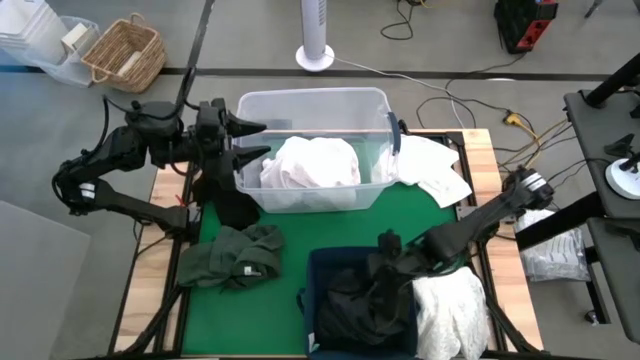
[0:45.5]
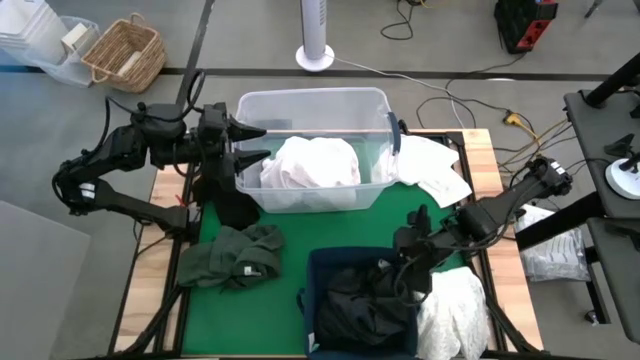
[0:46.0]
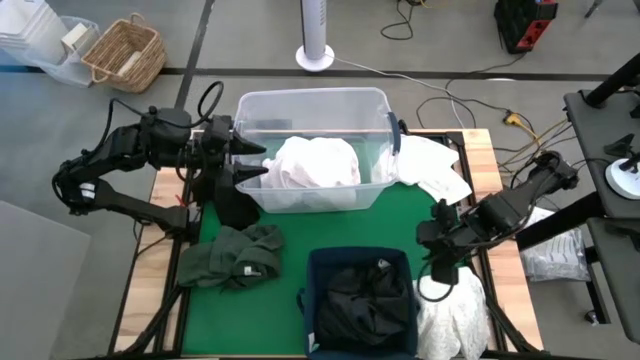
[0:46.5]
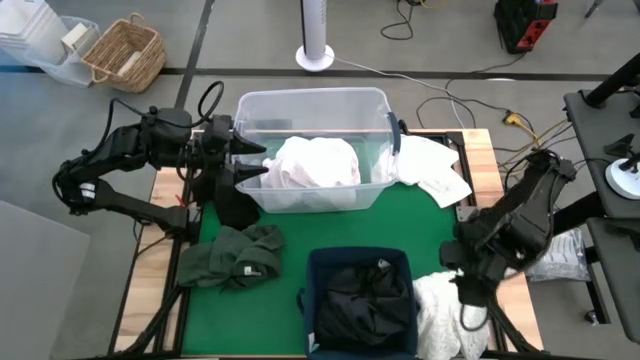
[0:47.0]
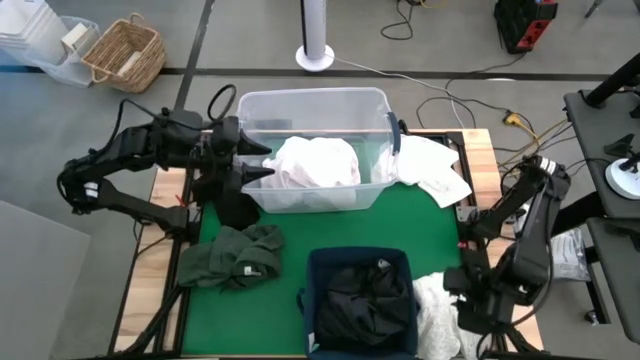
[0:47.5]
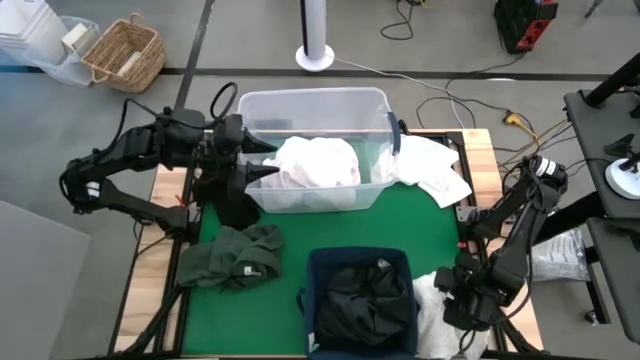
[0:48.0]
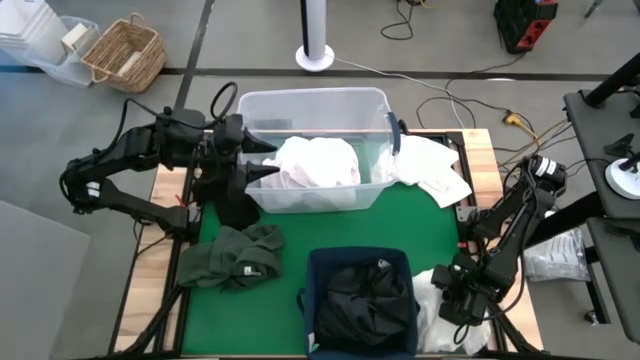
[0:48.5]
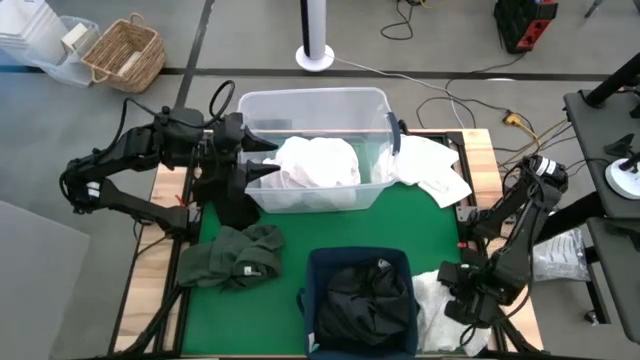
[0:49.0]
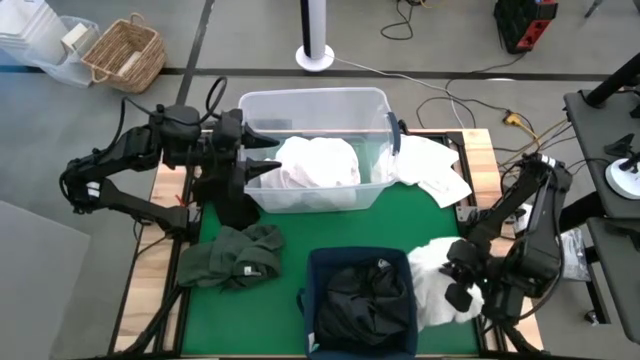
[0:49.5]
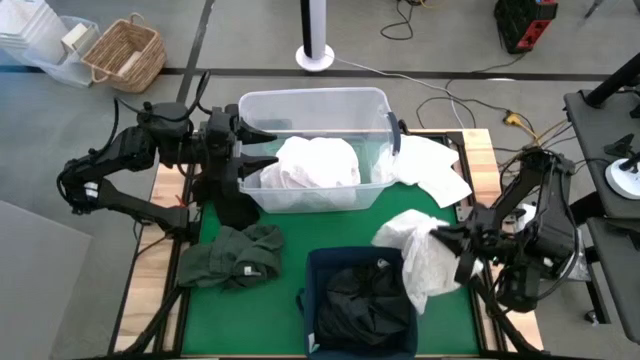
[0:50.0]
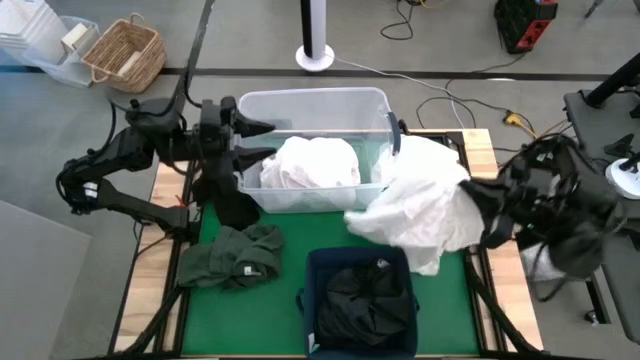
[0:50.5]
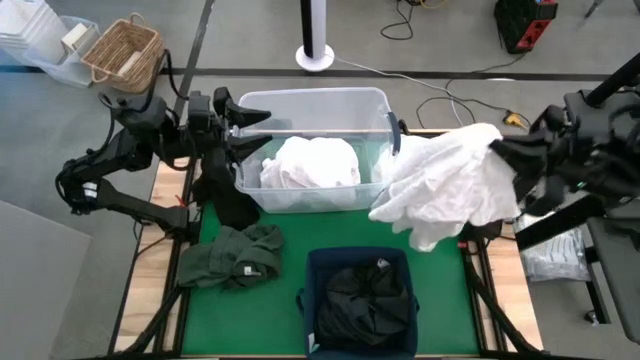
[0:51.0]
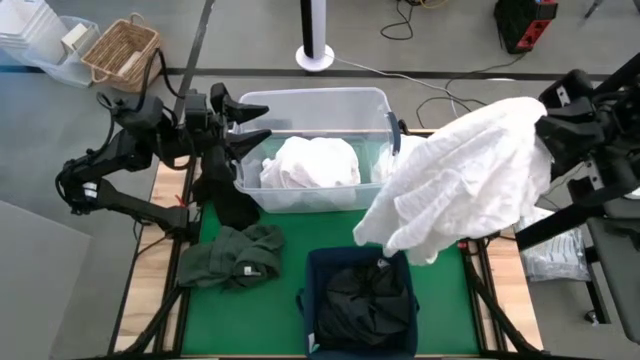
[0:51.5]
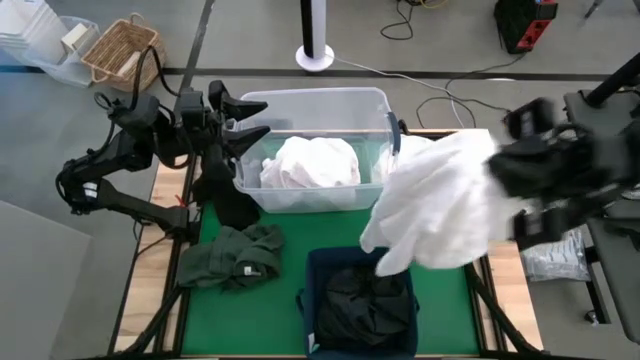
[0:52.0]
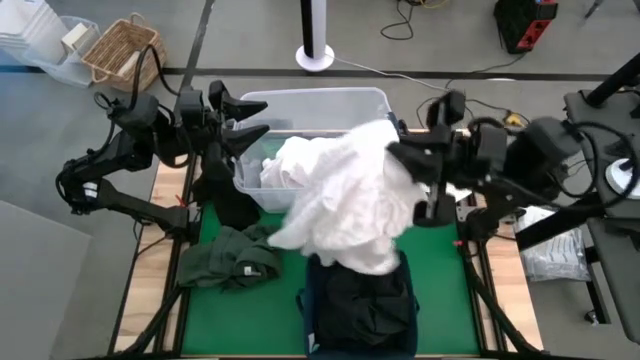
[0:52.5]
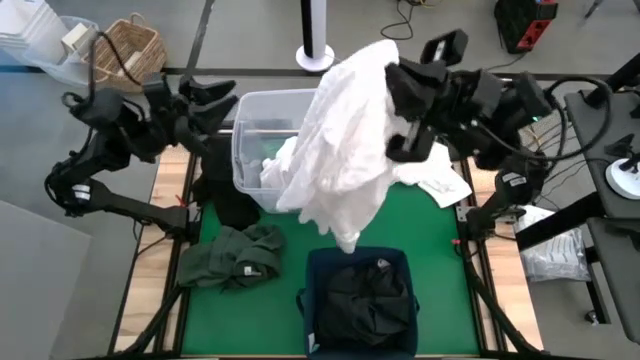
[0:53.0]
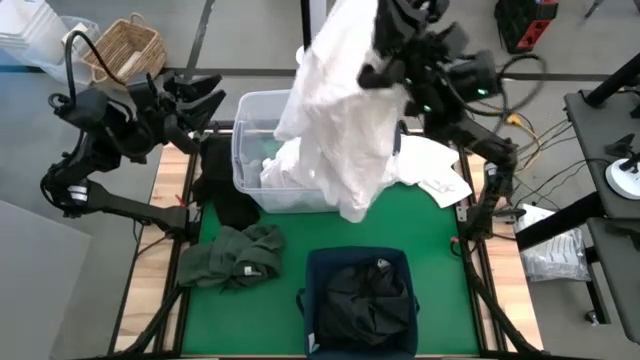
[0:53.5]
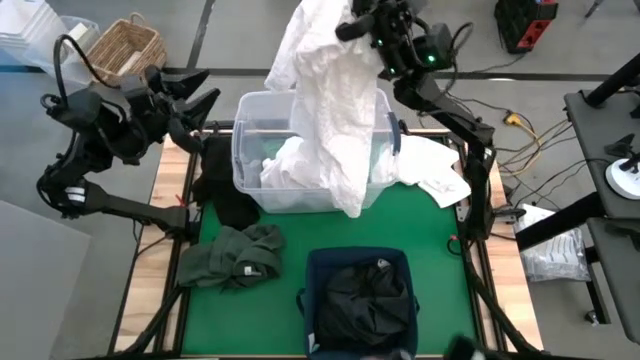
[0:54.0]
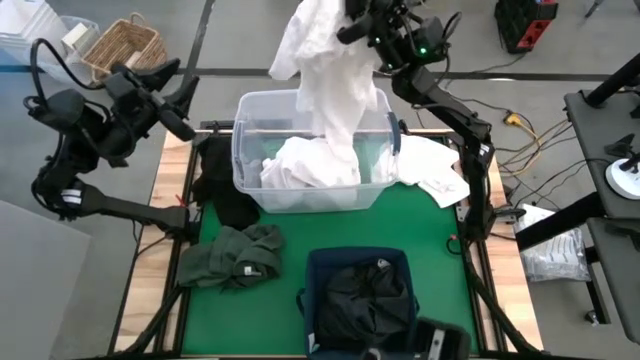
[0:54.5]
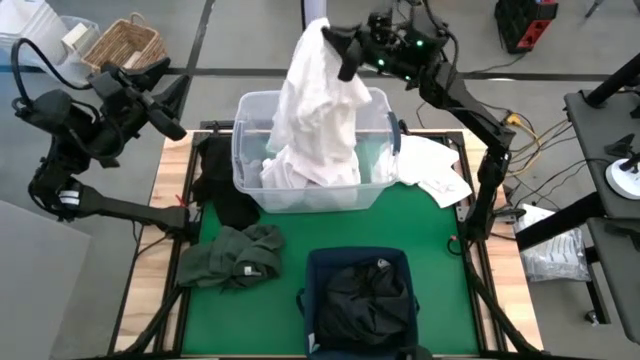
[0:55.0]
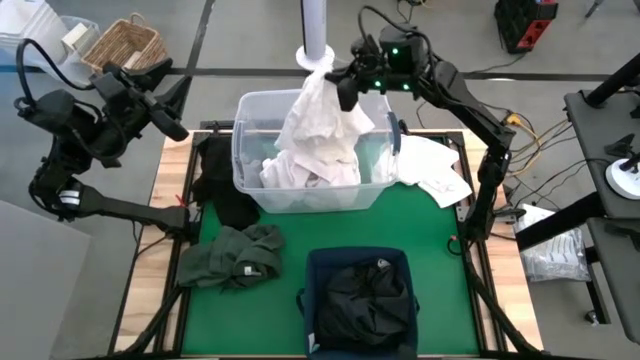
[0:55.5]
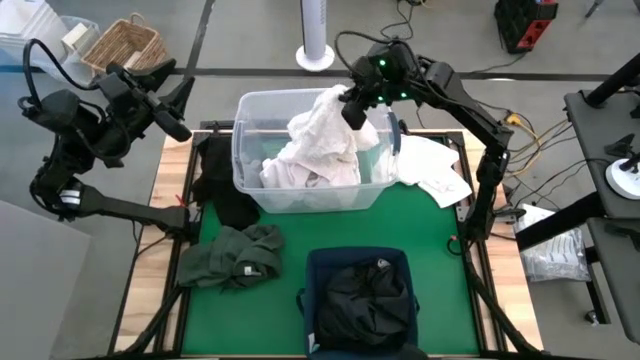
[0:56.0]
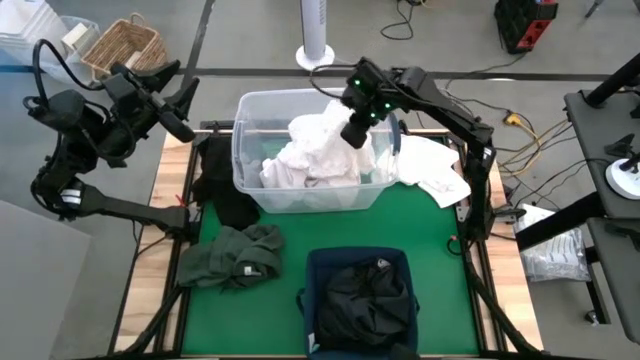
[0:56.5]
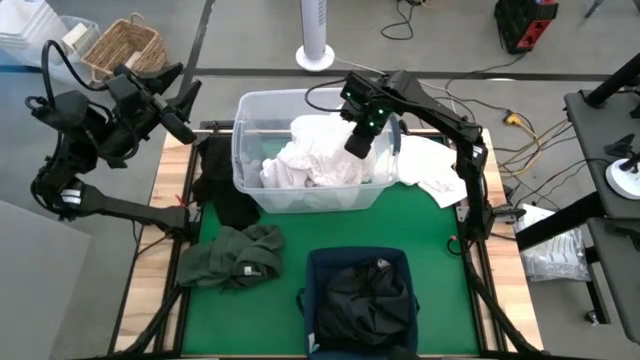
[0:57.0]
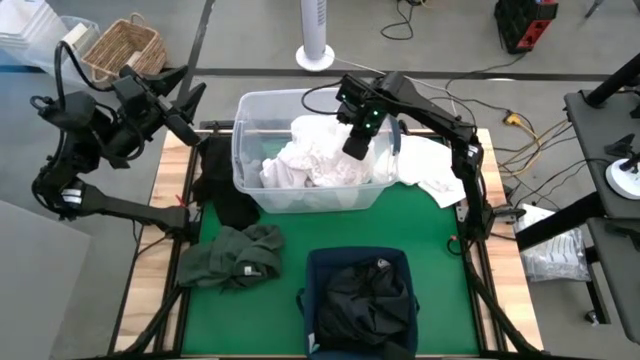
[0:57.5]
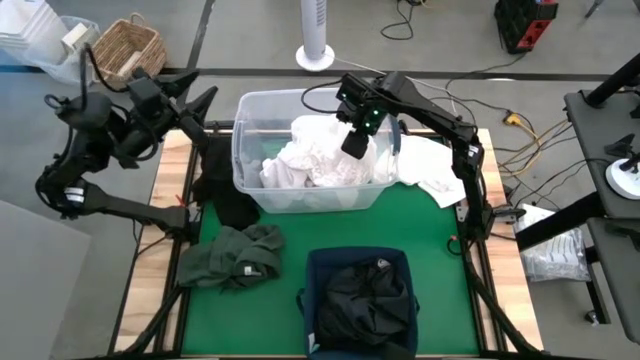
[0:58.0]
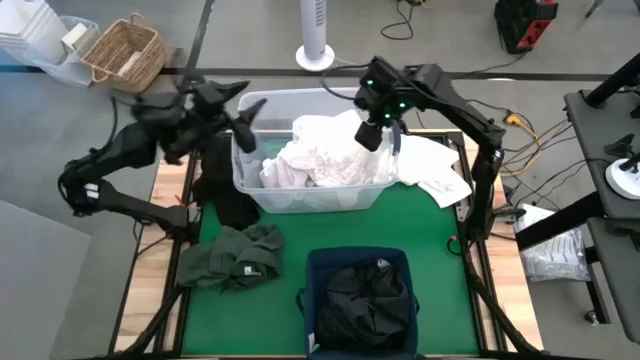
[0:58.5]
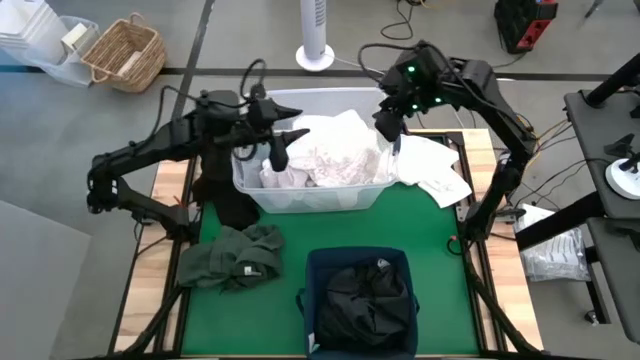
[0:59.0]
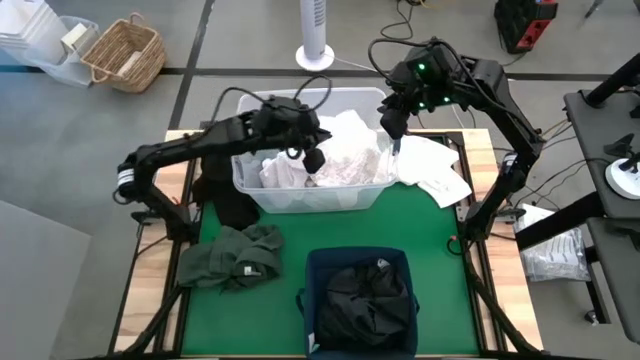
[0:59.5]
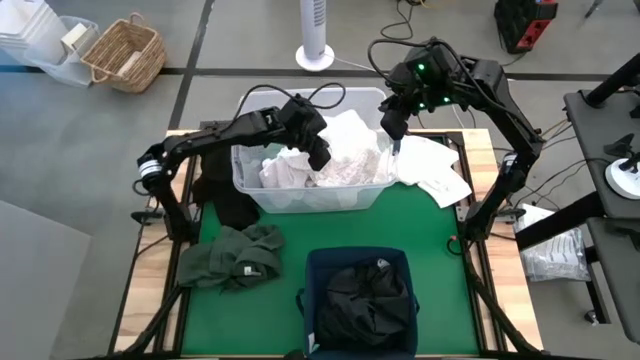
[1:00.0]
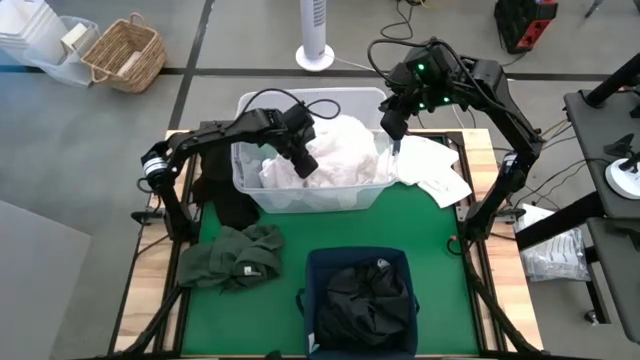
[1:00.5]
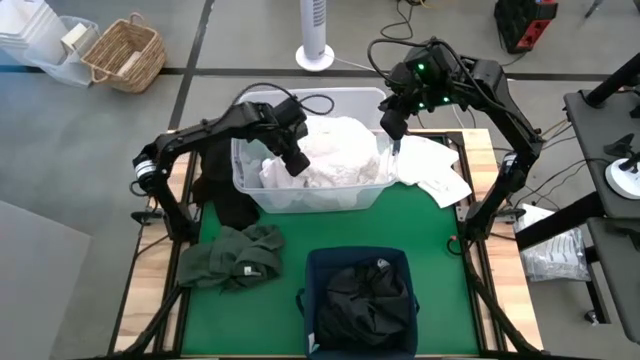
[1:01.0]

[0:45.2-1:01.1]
Put the white blouse into the transparent laundry bin

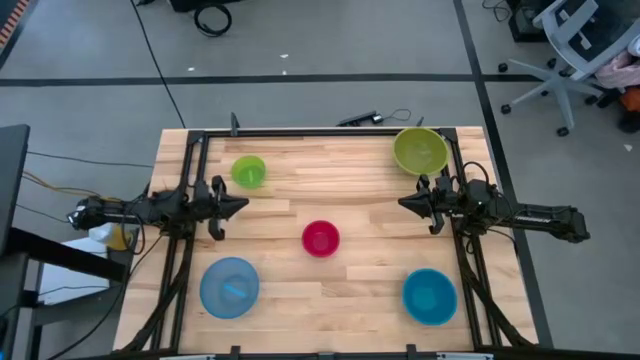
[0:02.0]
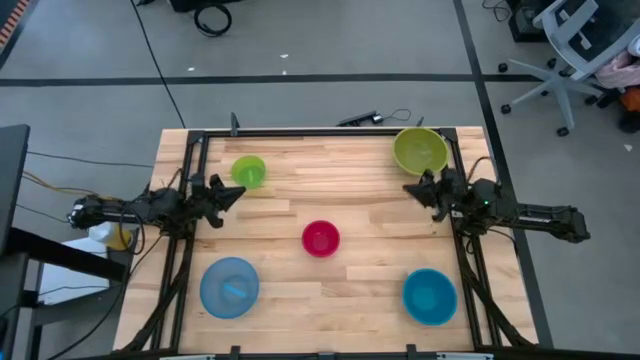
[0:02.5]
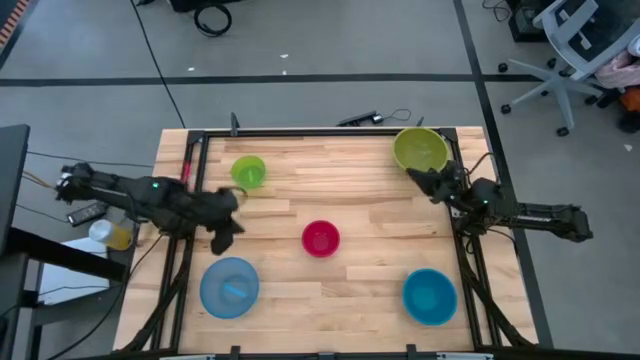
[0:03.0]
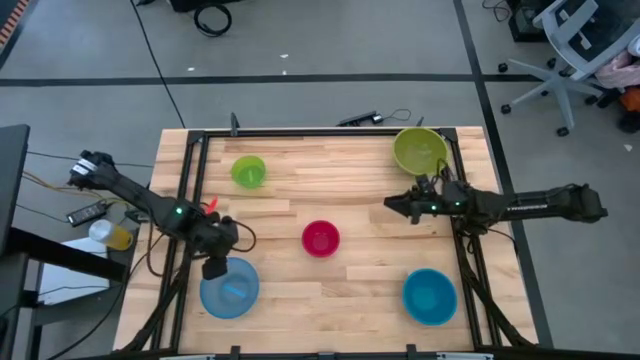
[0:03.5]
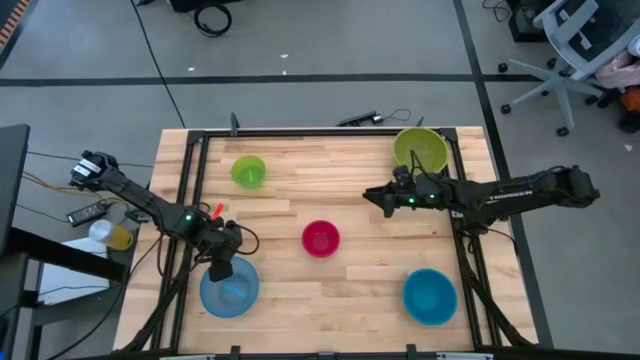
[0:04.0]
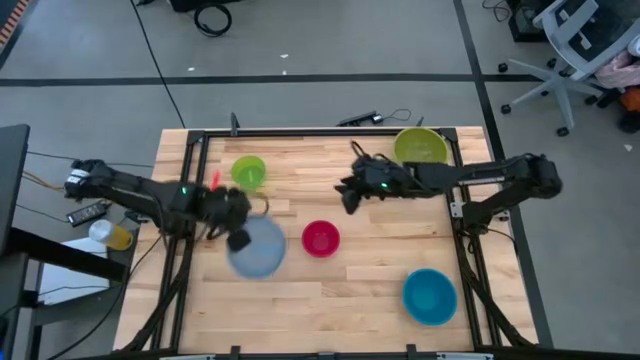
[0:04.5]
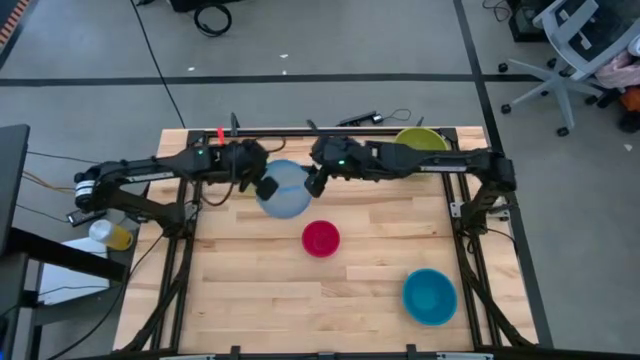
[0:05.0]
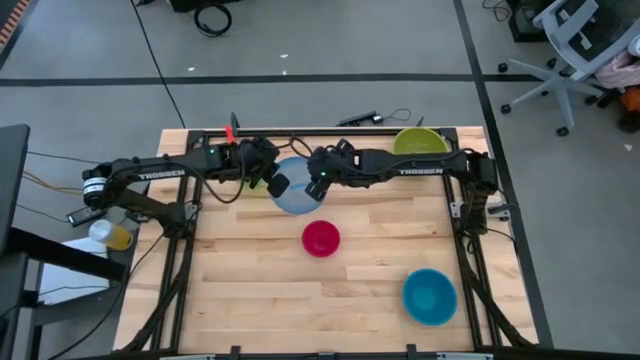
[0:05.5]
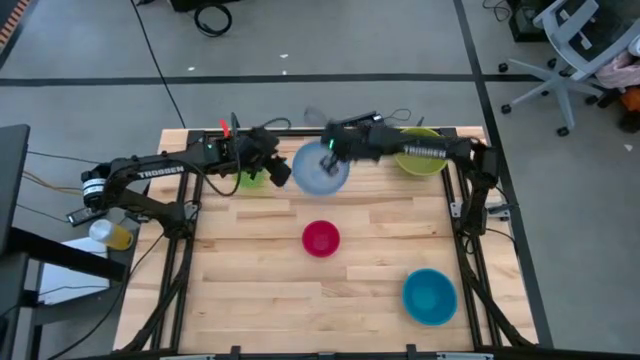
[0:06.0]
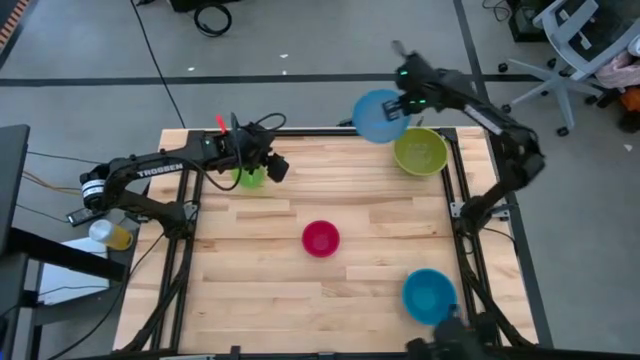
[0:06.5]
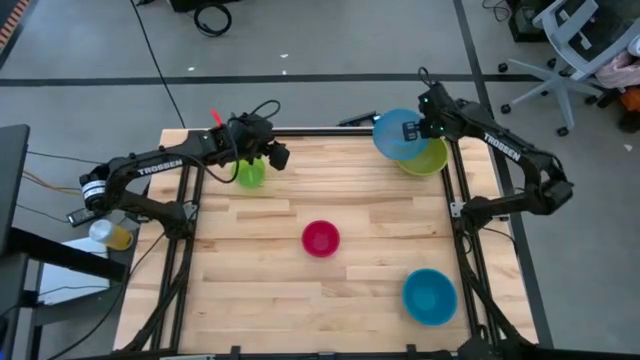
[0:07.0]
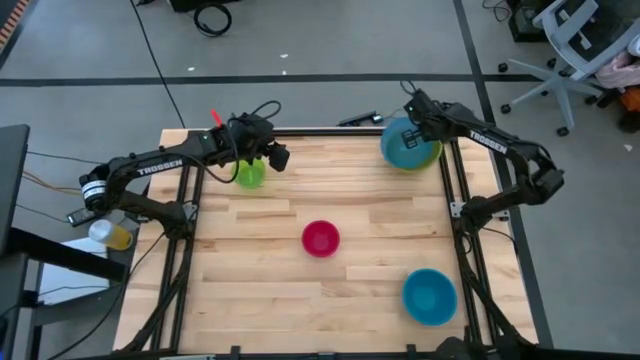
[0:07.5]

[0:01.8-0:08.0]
Stack the large blue bowl on top of the large green bowl
